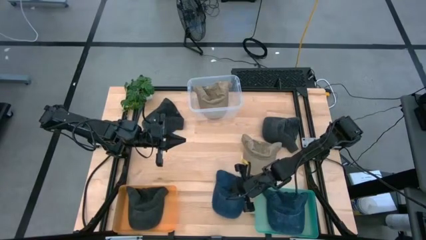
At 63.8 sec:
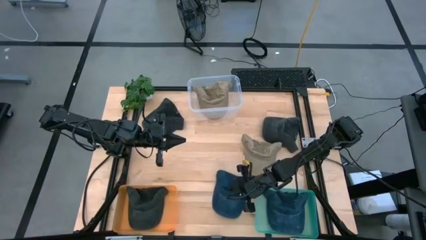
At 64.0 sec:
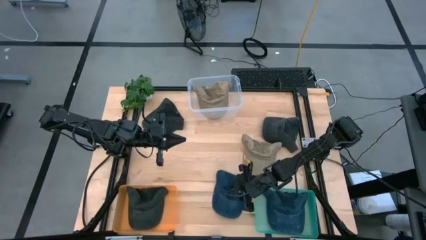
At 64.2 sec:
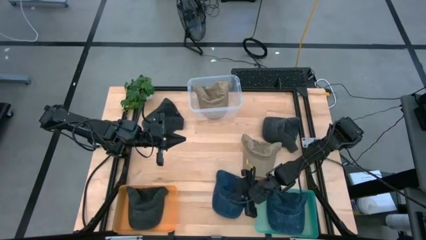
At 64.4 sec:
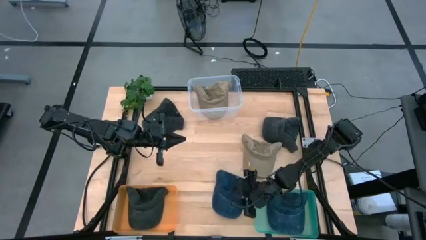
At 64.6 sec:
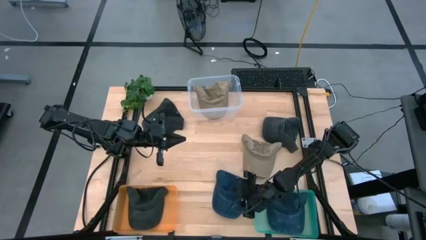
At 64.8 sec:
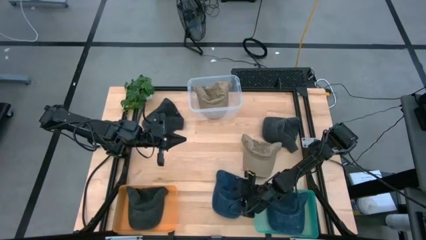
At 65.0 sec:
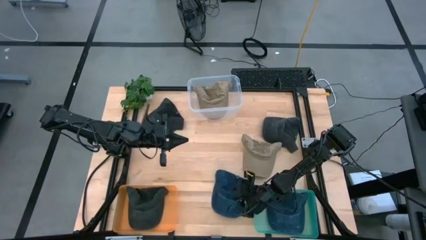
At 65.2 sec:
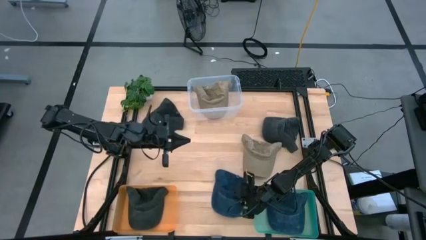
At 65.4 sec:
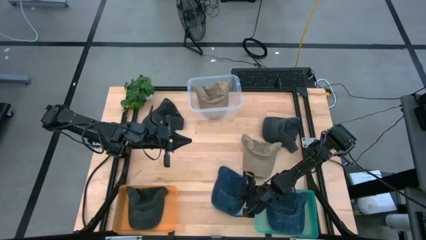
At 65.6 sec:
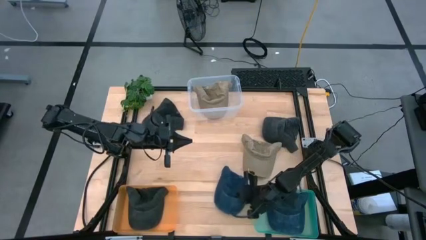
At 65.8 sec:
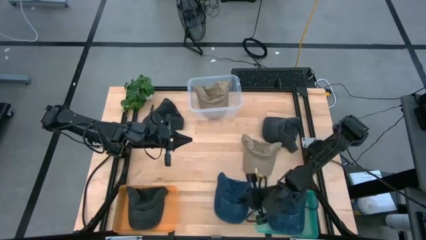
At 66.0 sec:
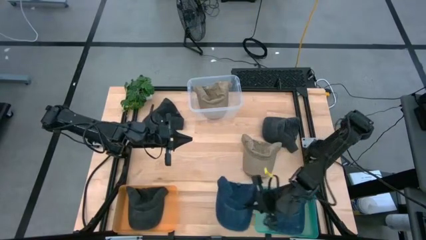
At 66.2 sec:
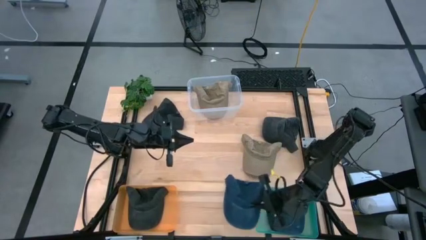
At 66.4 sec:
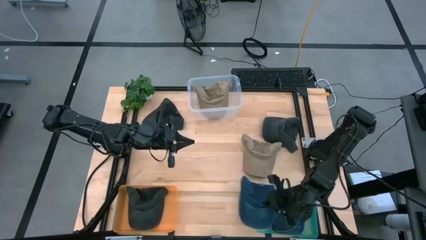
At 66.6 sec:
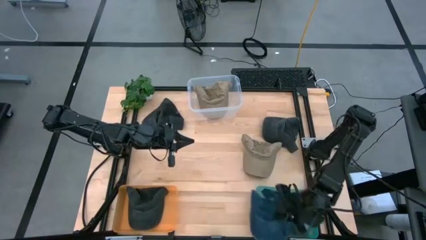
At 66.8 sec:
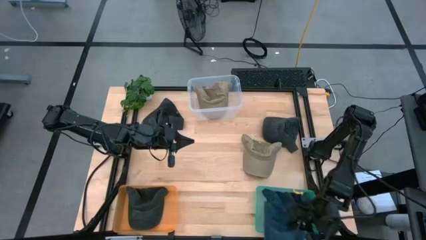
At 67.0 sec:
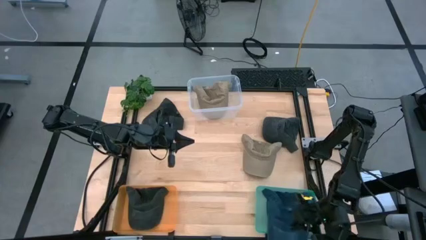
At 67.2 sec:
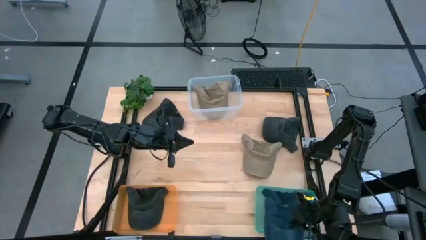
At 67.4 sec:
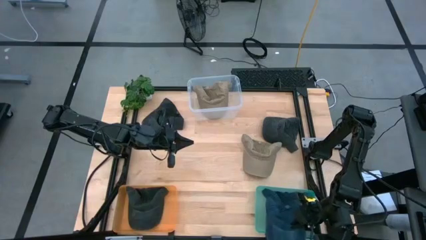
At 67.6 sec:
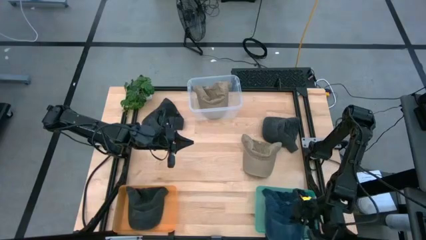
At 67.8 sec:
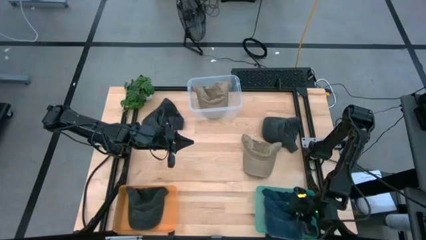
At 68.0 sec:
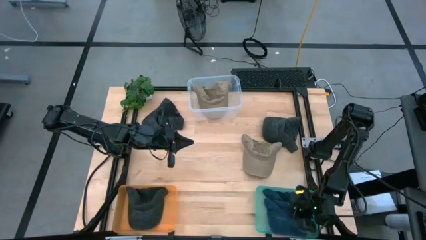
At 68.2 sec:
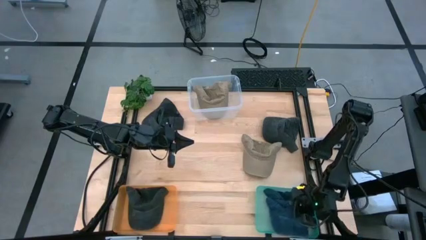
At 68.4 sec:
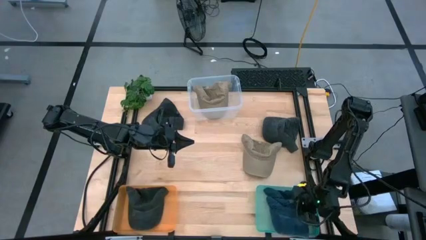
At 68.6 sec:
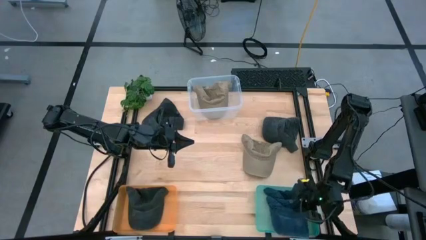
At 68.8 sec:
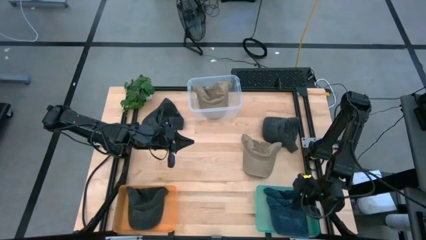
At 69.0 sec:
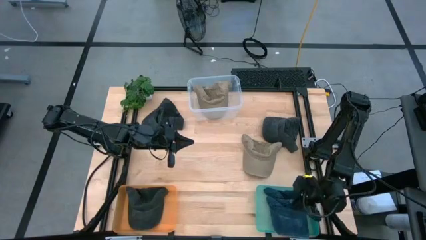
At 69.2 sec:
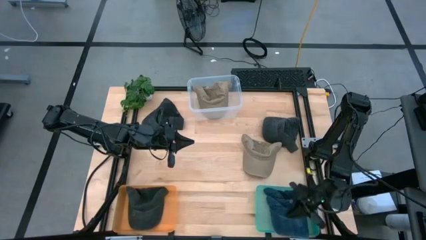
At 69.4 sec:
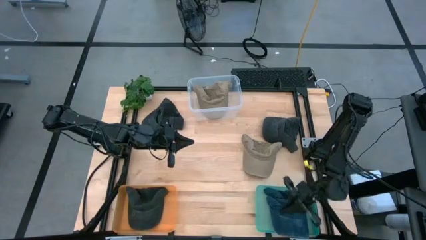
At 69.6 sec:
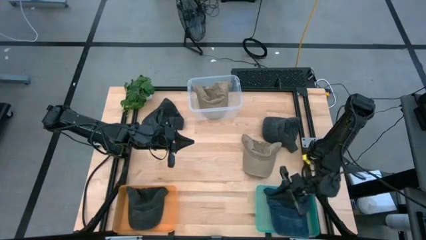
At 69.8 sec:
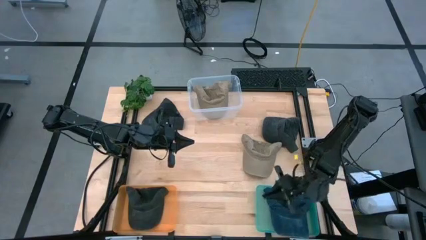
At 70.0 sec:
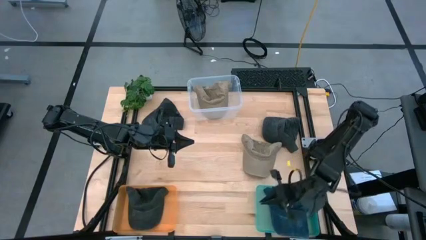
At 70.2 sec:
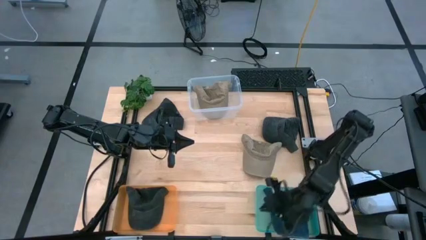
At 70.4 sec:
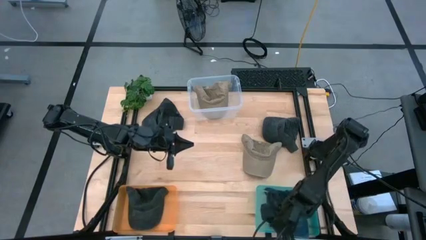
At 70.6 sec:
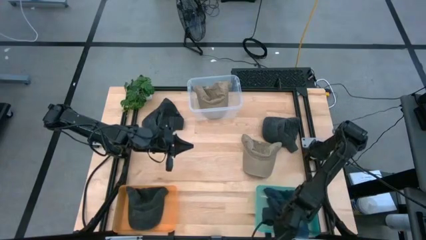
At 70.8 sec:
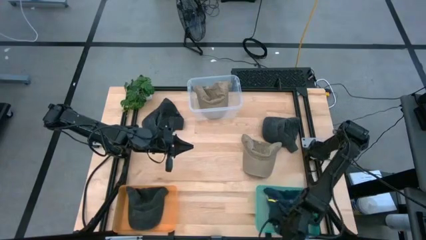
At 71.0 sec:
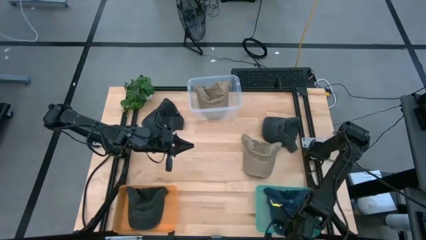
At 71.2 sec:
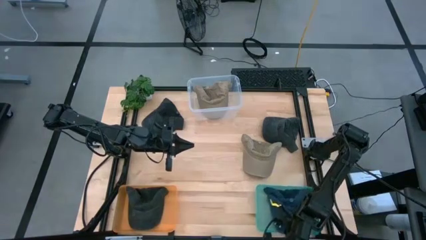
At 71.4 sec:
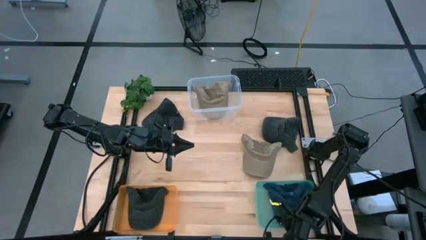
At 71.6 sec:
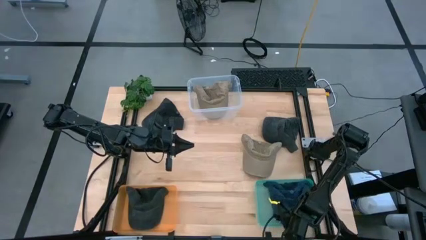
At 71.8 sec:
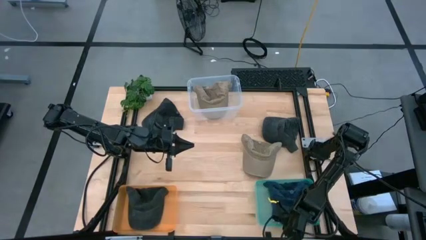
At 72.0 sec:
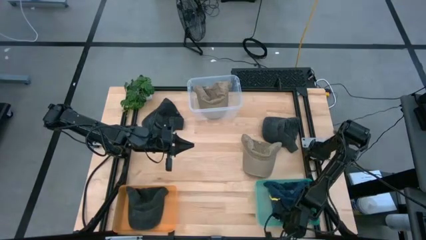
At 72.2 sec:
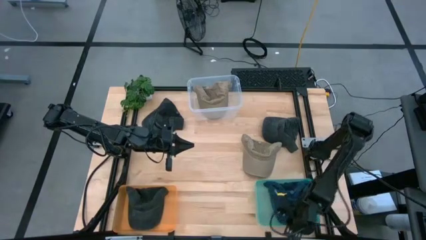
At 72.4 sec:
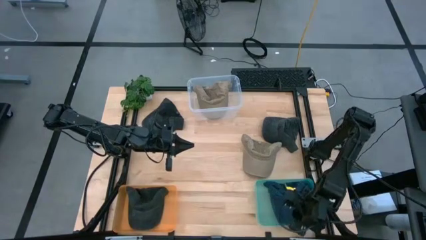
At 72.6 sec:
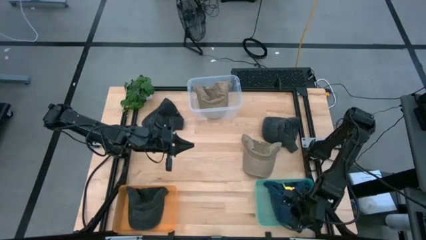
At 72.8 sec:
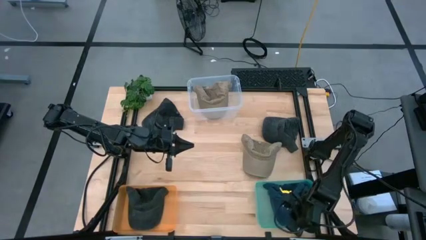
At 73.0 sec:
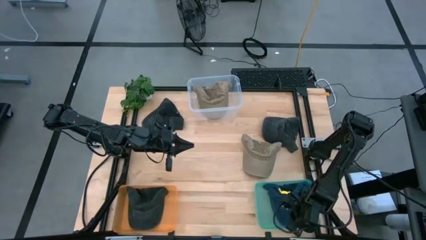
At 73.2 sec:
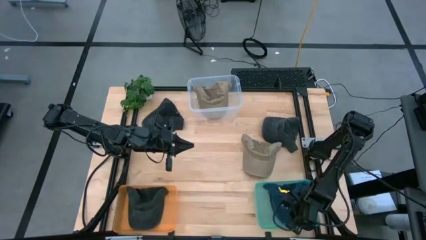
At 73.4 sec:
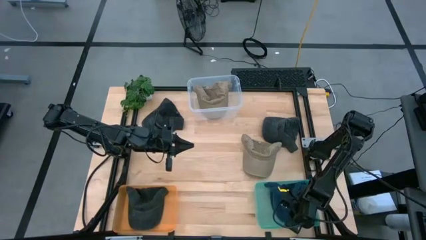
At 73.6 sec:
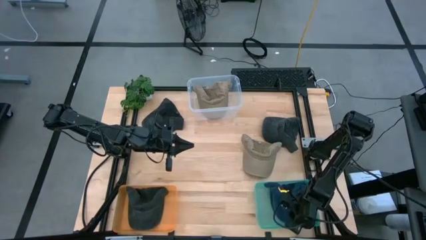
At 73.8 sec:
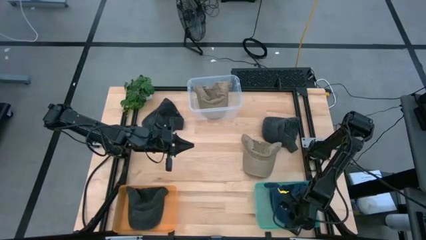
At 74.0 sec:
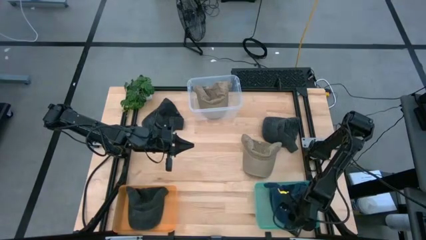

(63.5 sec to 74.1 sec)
Task: Pick & Place hat
Put the blue cap into the sky blue bin

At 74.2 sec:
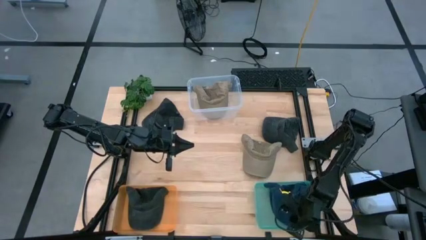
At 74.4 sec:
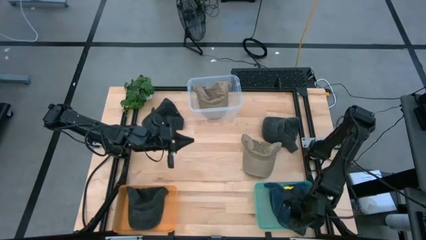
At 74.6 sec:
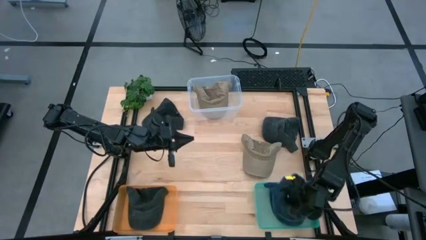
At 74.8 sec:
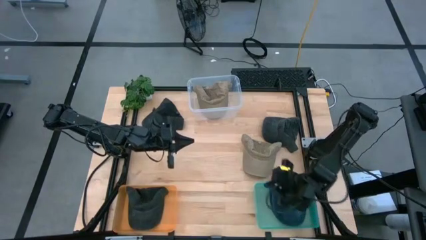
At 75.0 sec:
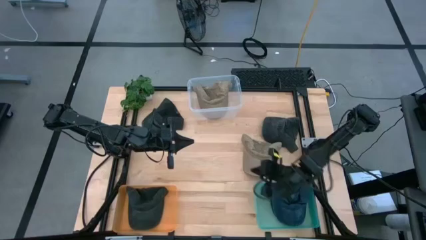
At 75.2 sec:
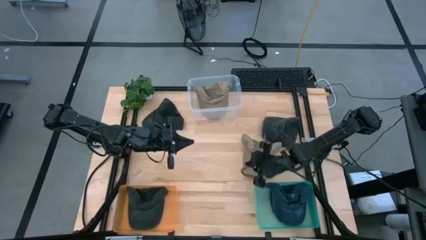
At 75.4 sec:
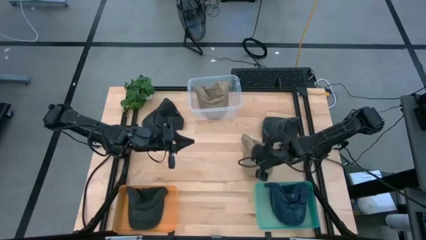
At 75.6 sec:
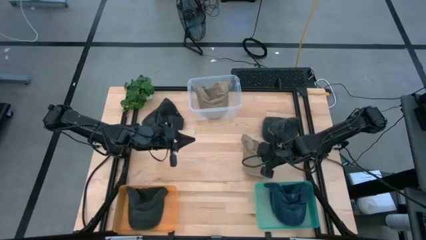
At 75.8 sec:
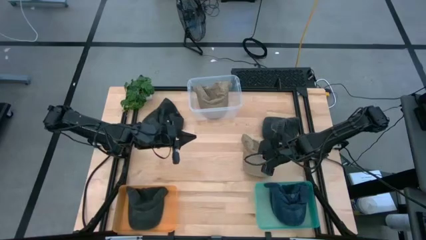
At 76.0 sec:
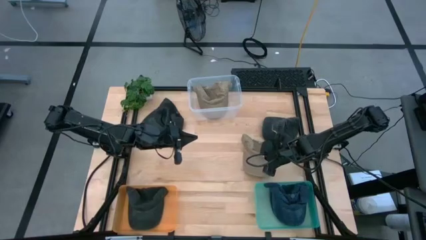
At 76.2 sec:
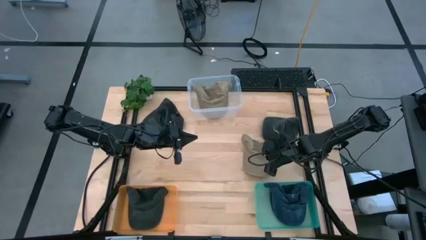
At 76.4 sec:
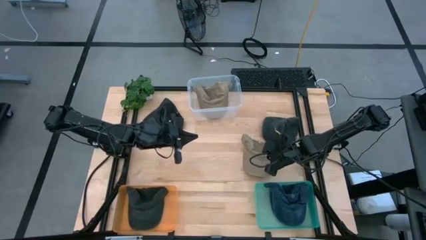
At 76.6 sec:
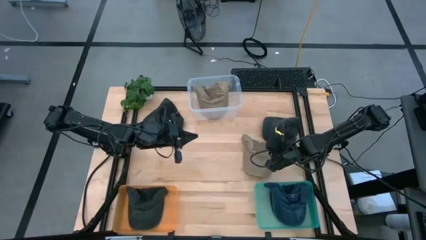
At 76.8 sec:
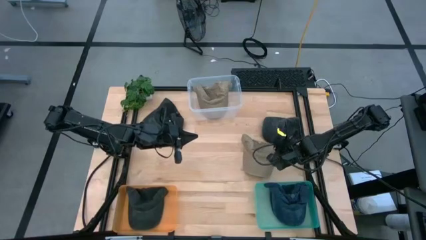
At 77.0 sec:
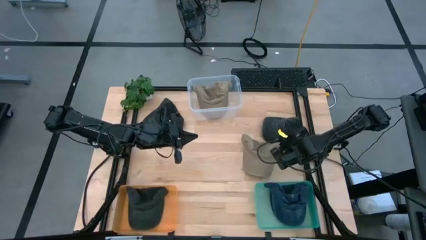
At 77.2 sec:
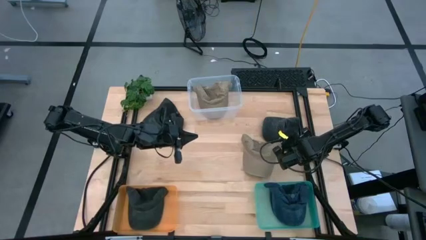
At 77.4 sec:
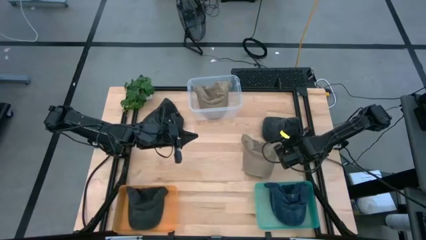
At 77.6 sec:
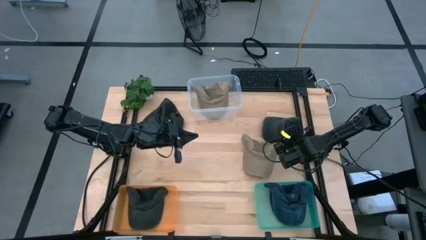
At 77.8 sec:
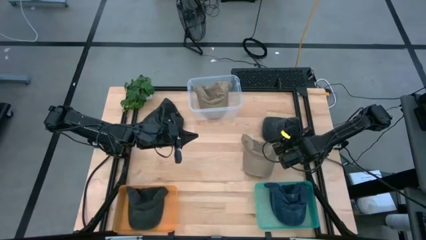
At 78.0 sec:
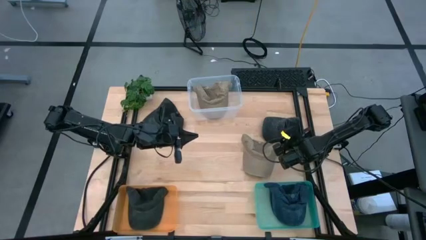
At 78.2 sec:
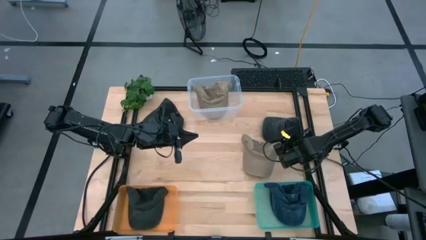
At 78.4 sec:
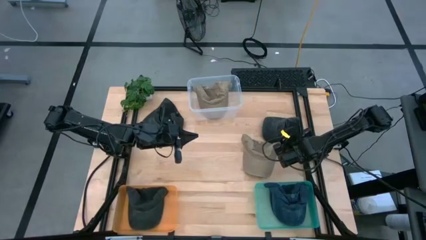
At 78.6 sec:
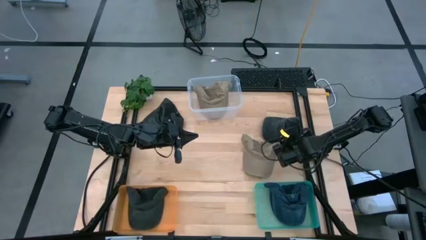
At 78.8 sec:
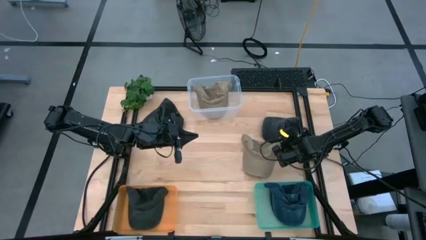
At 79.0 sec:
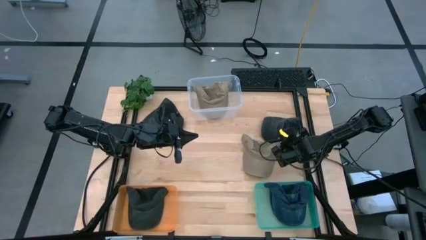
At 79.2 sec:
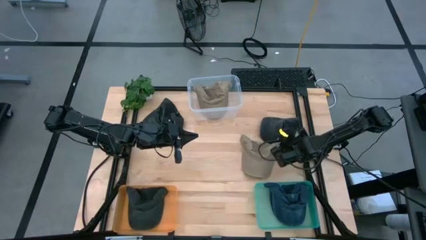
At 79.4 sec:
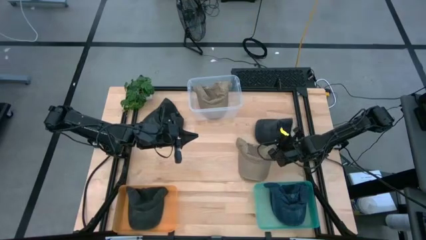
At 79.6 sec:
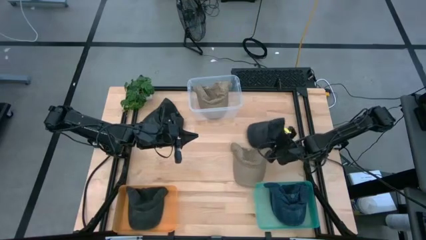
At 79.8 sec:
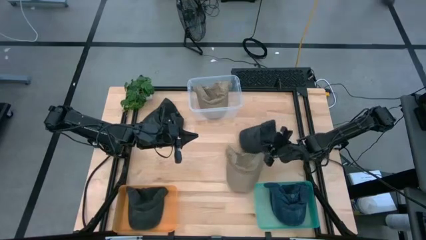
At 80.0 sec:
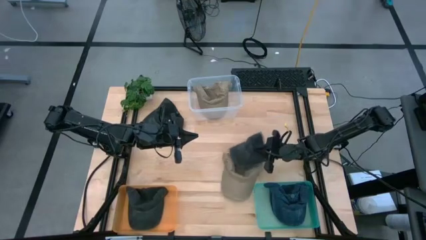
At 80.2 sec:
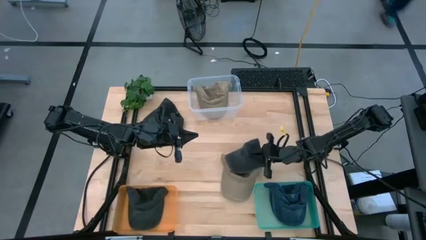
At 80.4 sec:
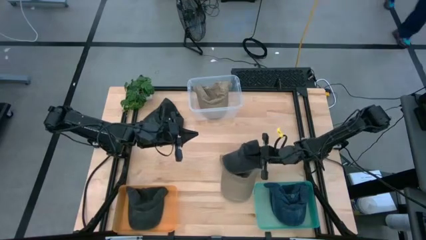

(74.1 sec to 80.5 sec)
Put the right black cap into the orange bin
